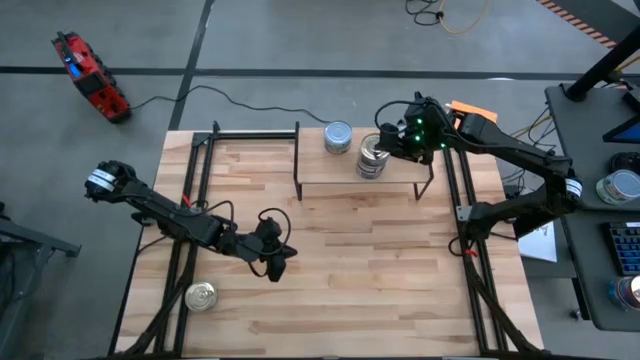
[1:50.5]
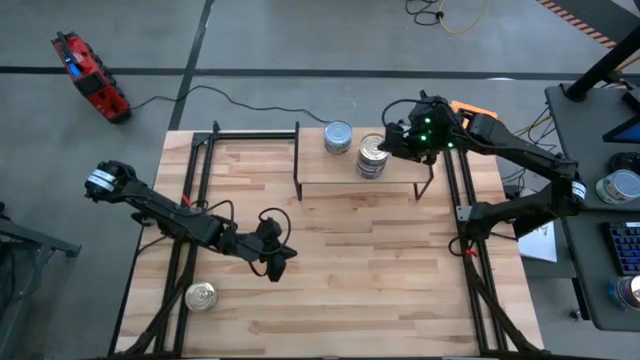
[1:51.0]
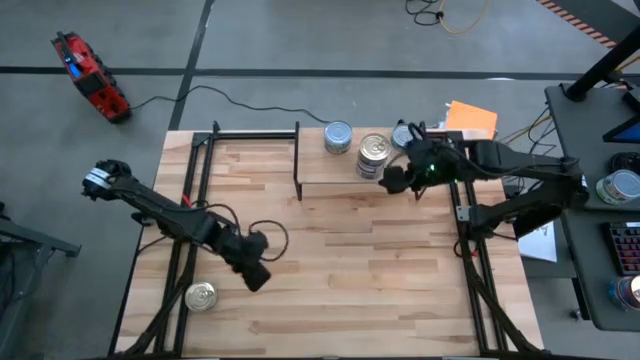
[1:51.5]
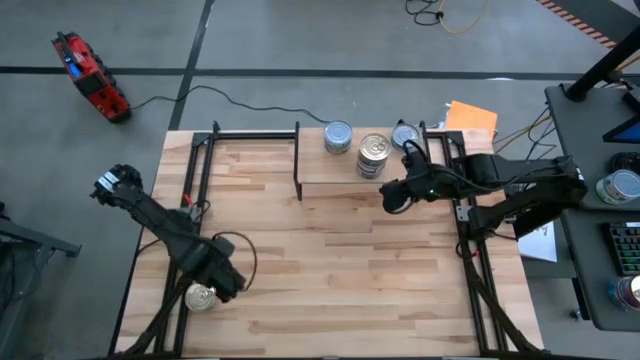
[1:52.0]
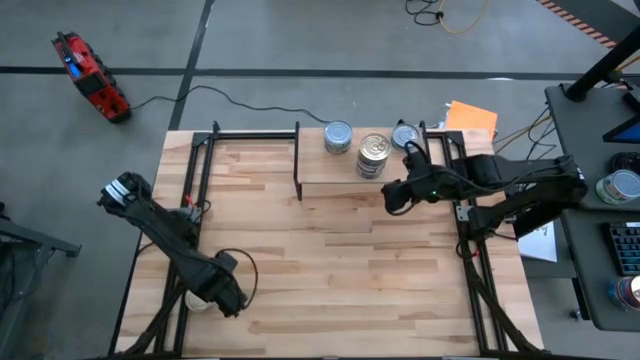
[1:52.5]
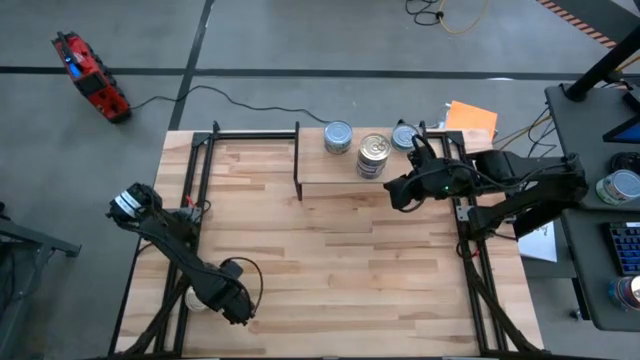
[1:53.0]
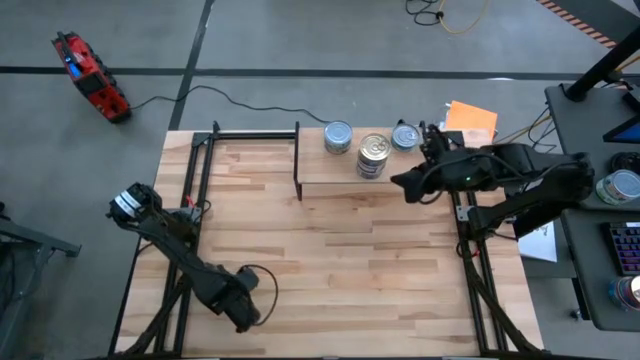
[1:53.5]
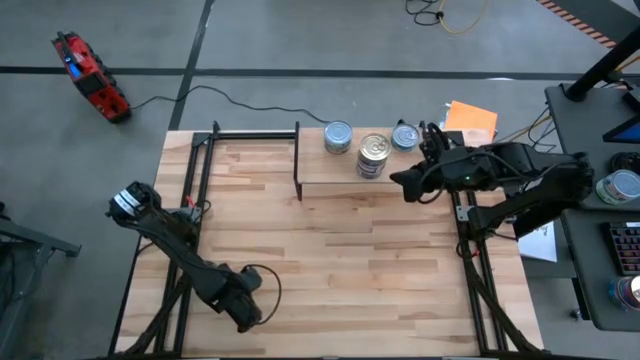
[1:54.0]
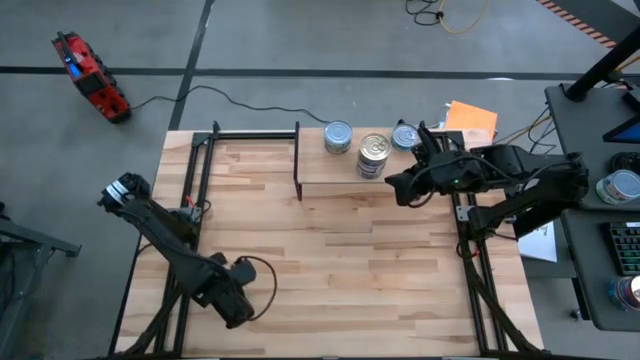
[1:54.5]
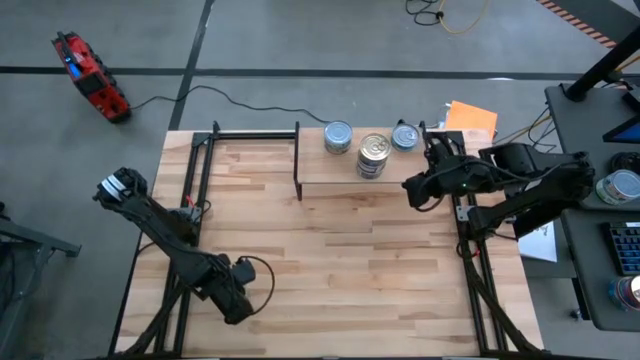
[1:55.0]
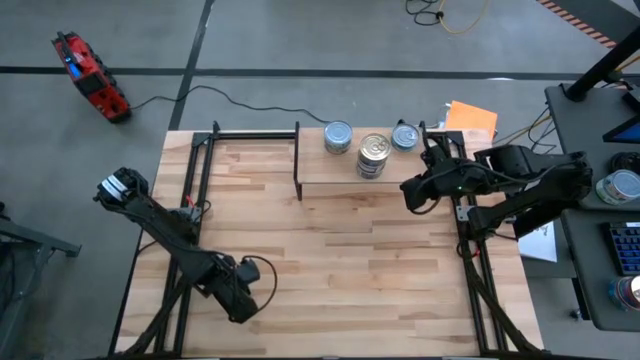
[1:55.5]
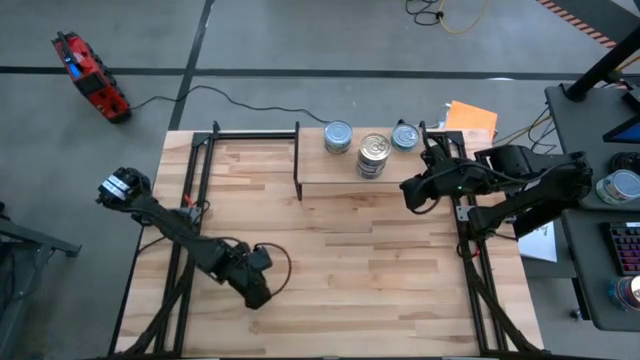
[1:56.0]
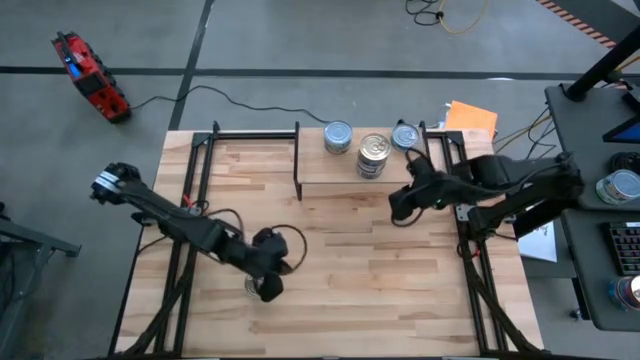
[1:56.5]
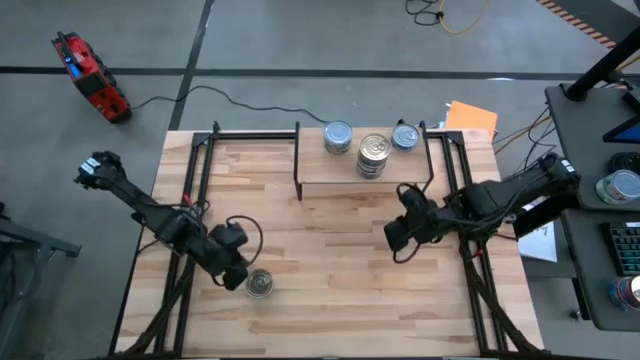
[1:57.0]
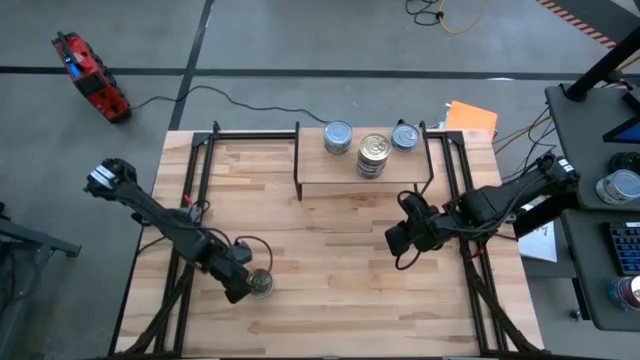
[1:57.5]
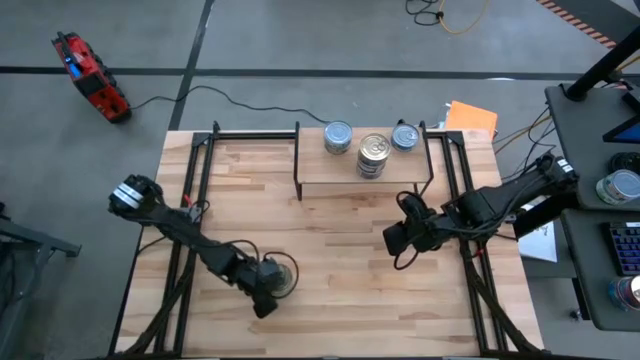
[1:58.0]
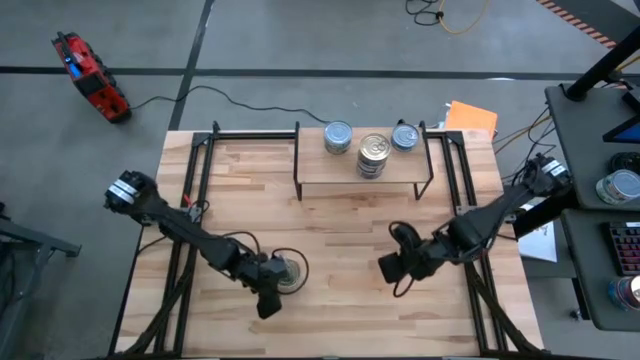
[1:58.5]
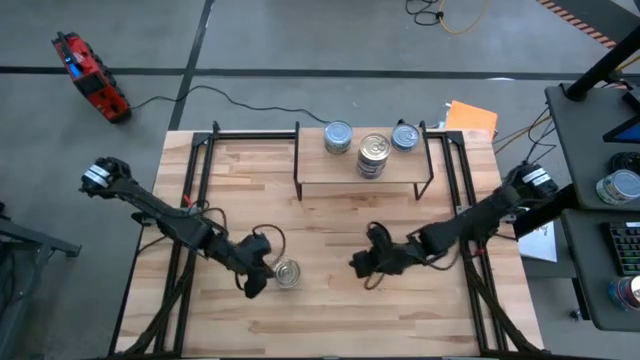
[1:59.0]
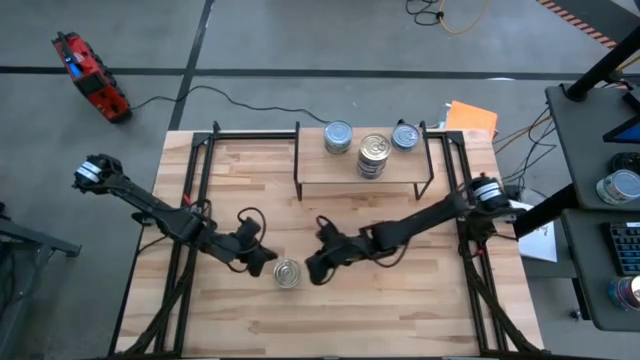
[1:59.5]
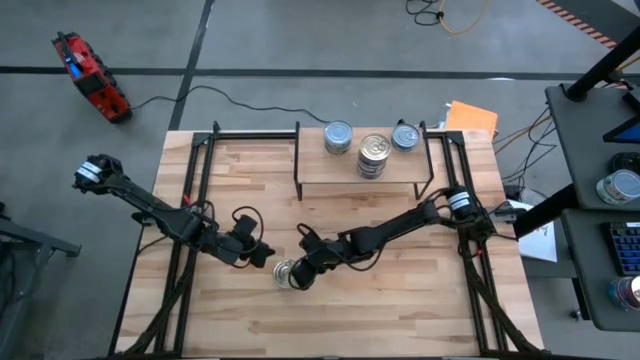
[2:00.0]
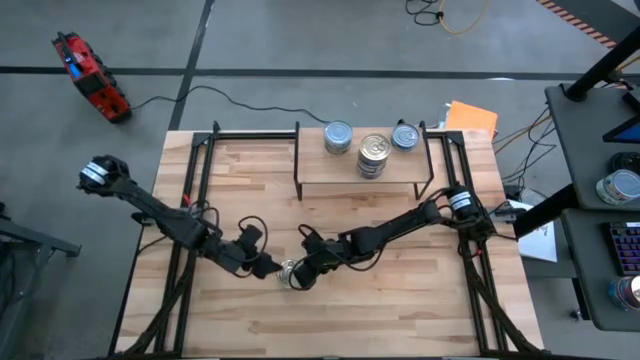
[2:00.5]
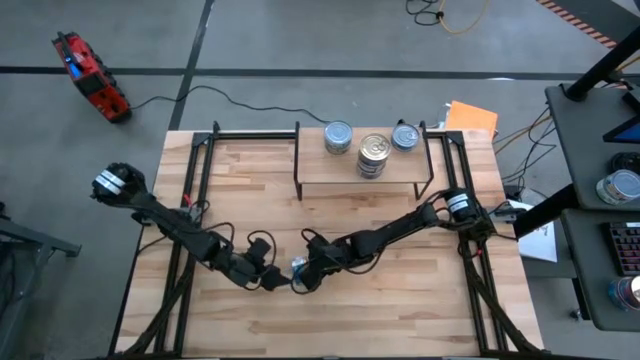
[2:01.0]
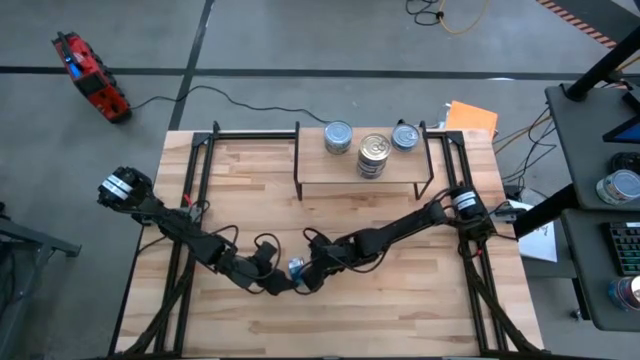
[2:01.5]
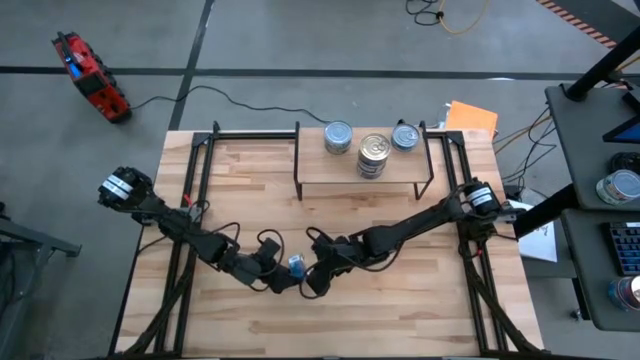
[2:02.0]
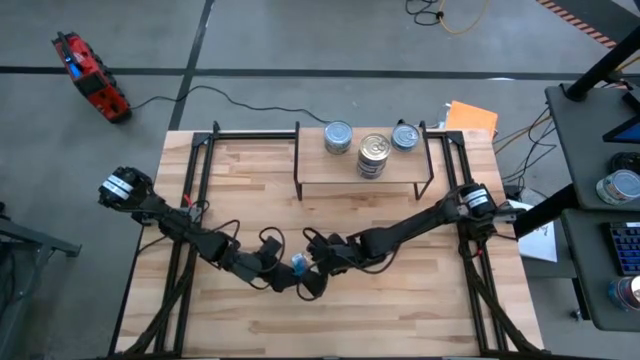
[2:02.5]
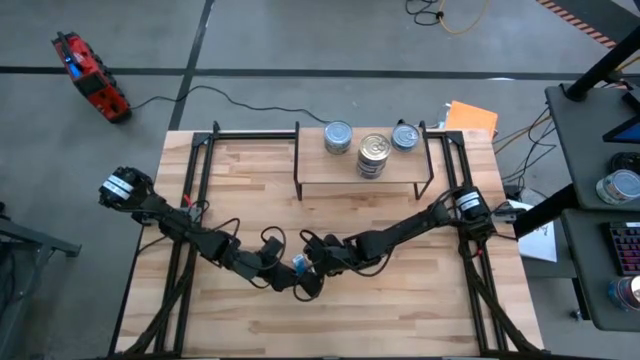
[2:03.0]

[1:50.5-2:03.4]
Task: Stack canned seafood by type on shelf
Stack the blue-pink tuna can on top of the other blue-pink tuna cans

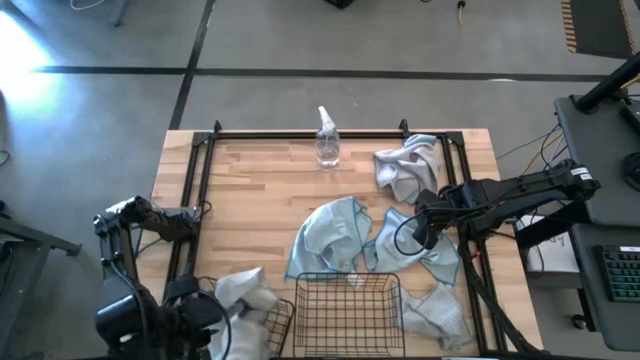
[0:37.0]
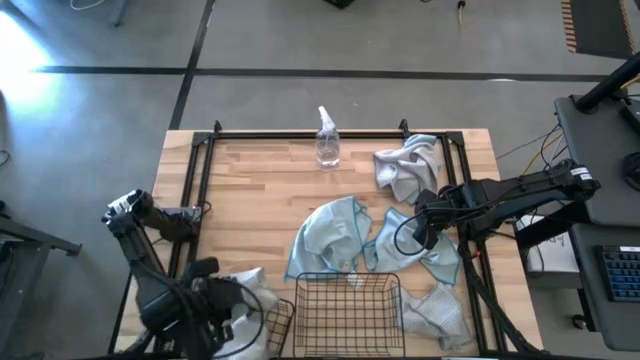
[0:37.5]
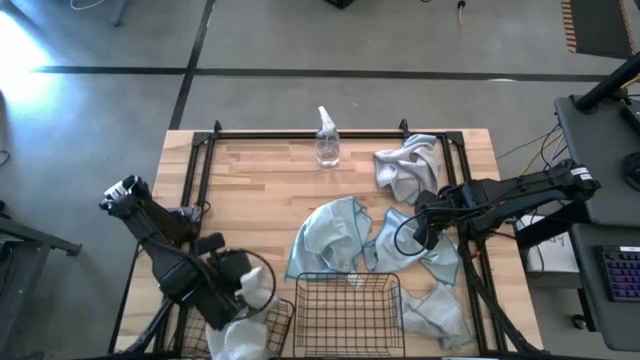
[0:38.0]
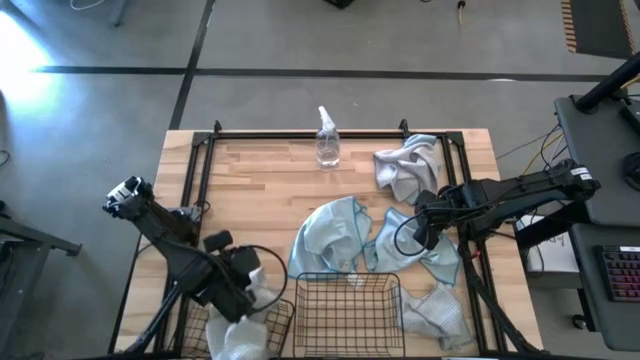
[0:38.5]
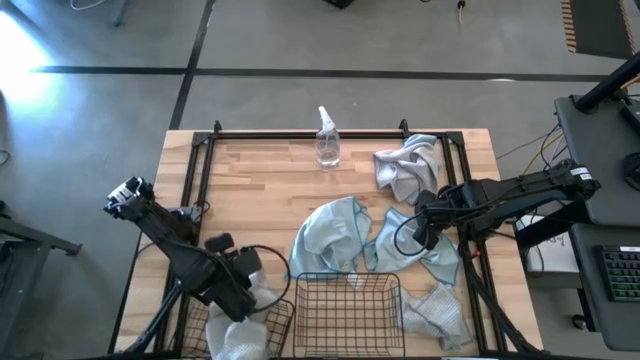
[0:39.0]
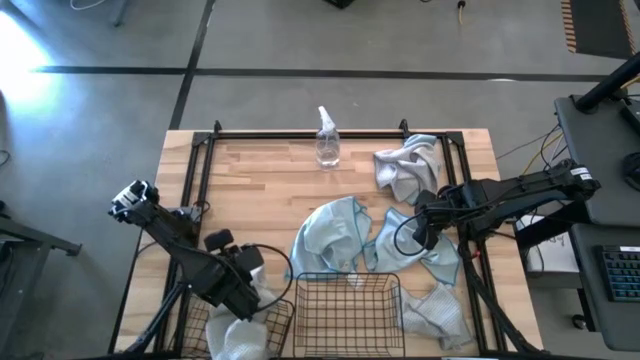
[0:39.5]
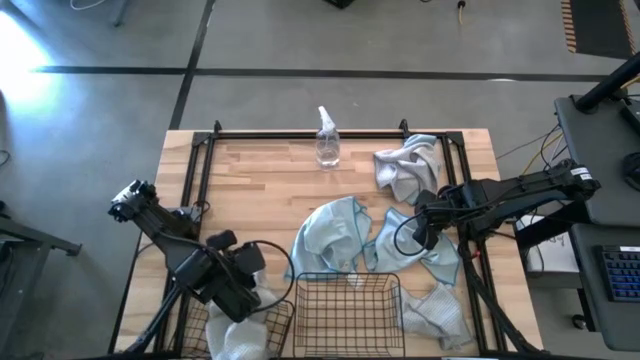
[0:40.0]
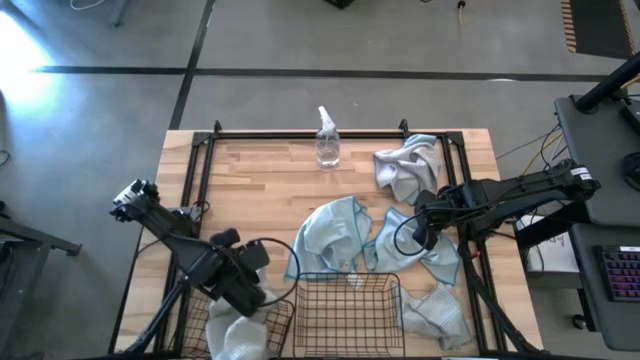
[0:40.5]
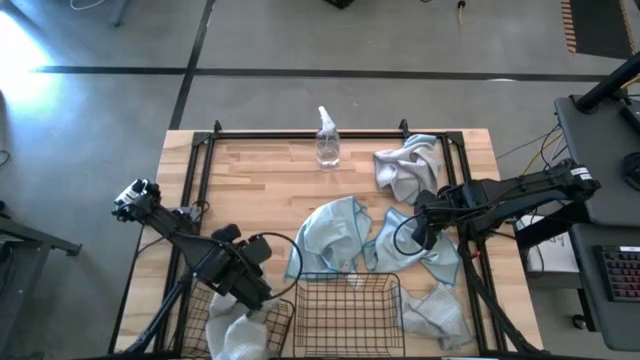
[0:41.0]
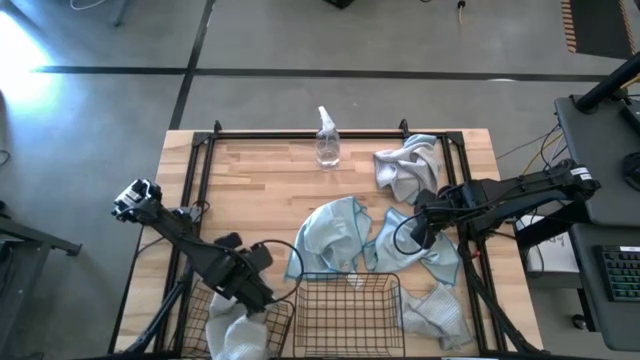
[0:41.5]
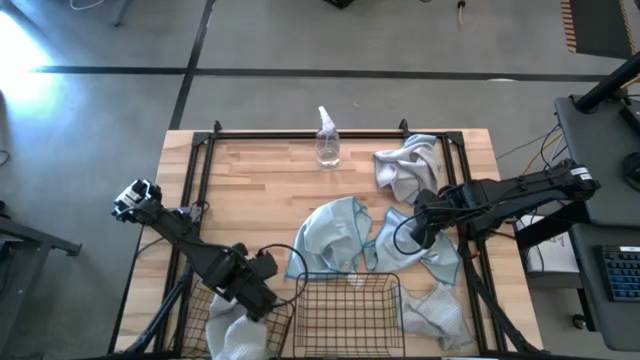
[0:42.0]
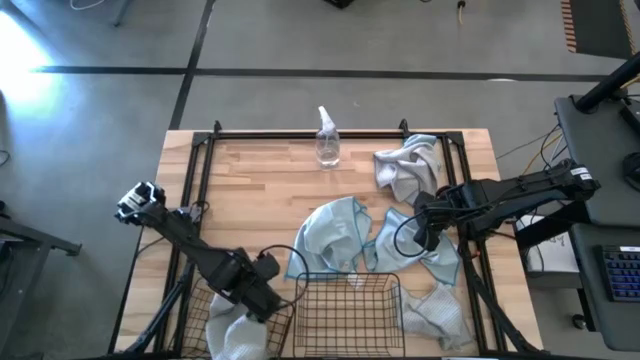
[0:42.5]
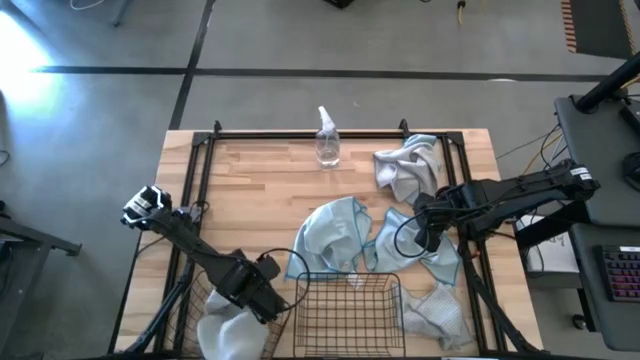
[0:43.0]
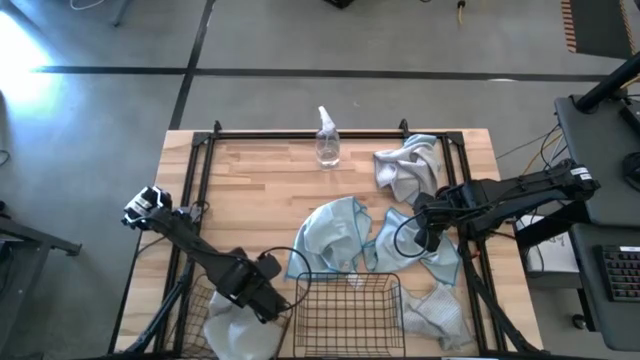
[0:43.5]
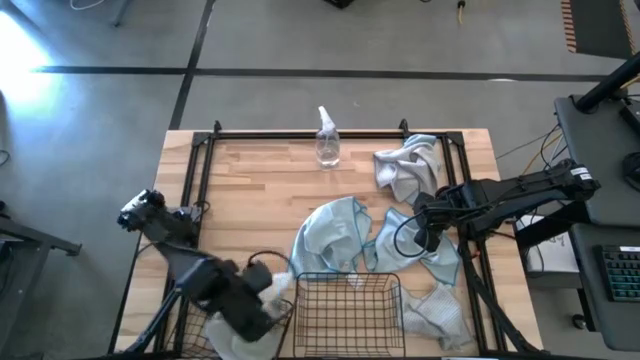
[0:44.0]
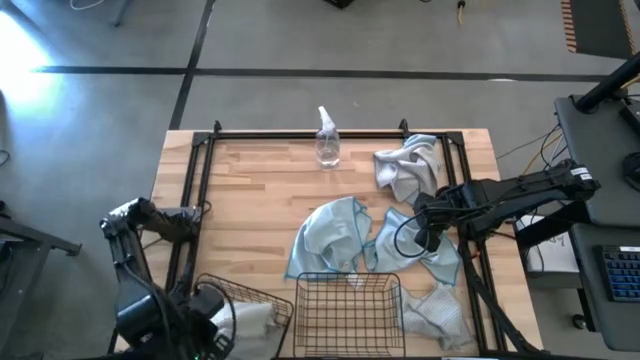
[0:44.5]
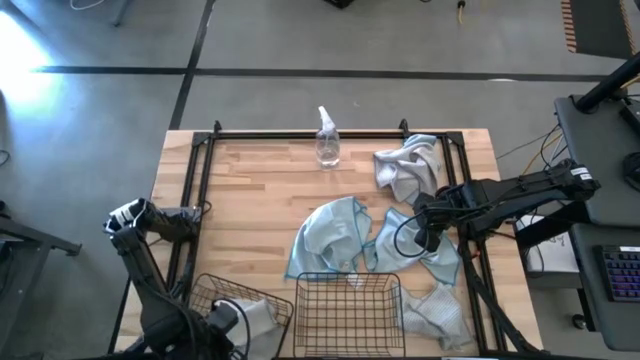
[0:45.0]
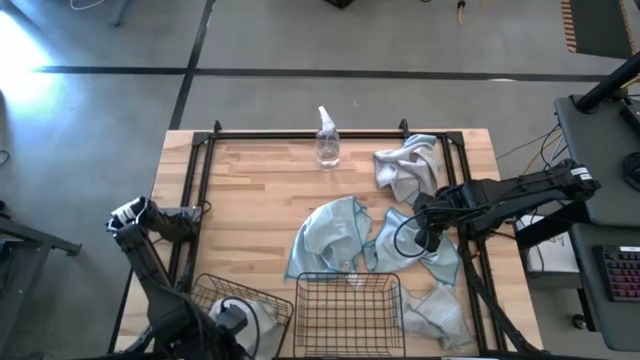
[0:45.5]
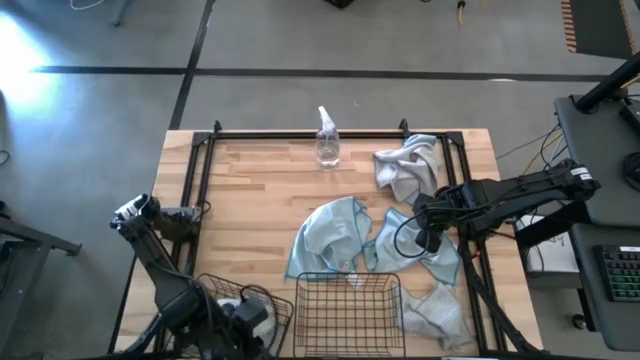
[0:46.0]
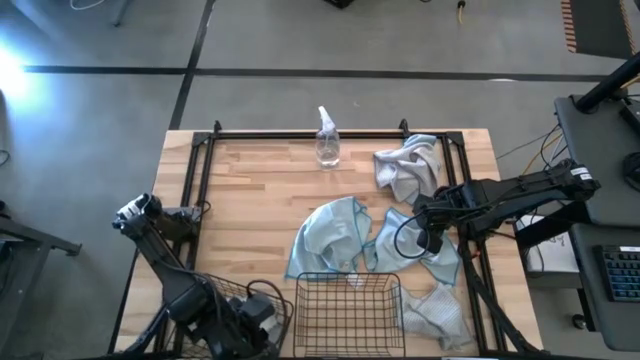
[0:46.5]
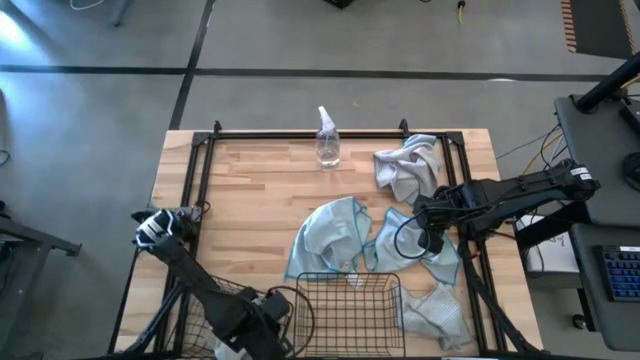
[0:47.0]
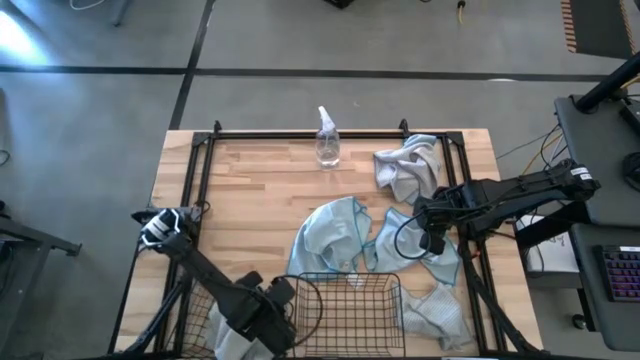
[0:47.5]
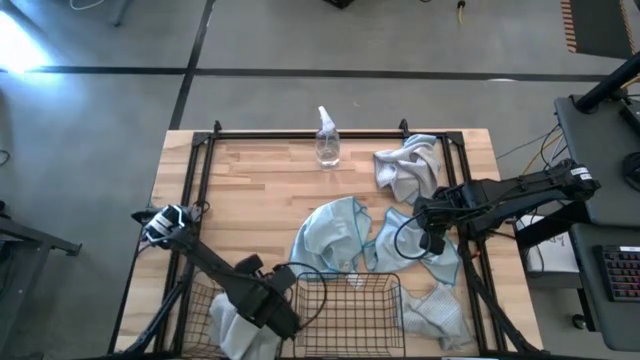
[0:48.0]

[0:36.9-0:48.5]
Task: Sort microfiber towel by color & place in baskets
Adjust the gray microfiber towel from the left black wire basket
